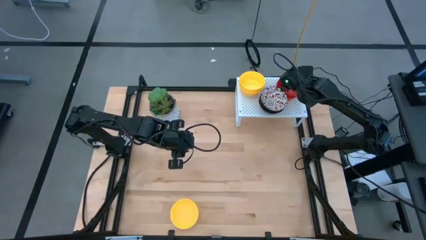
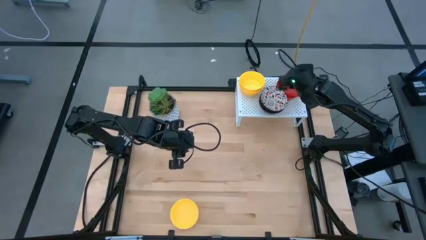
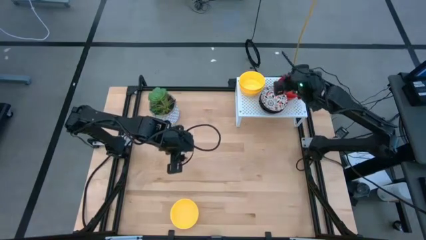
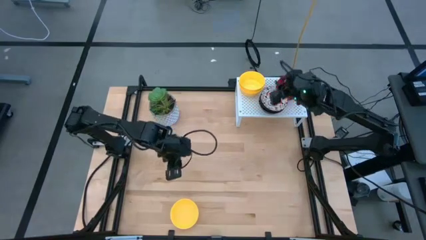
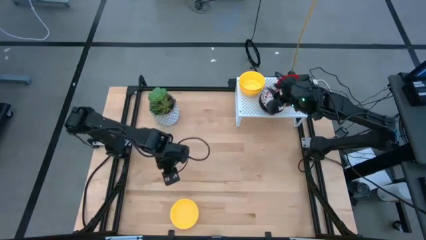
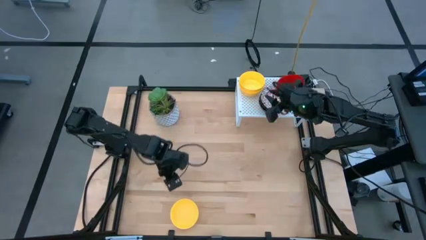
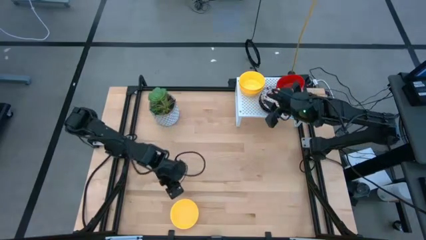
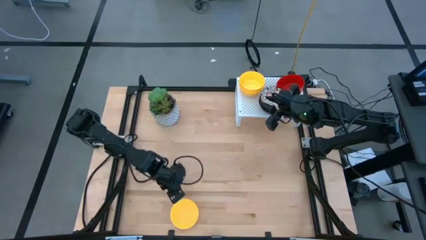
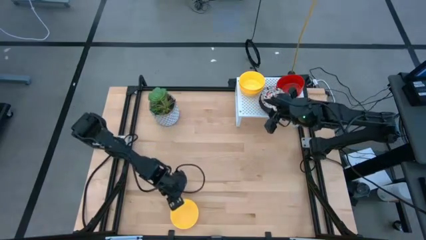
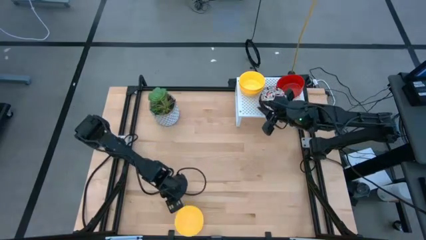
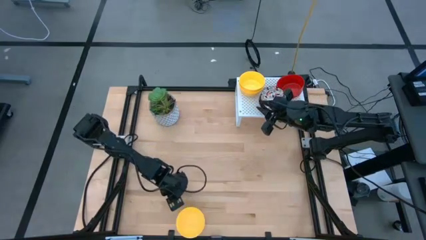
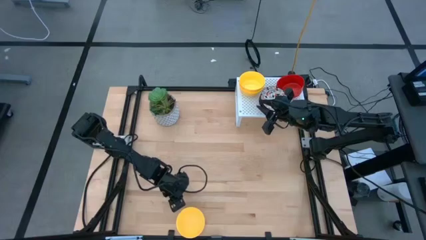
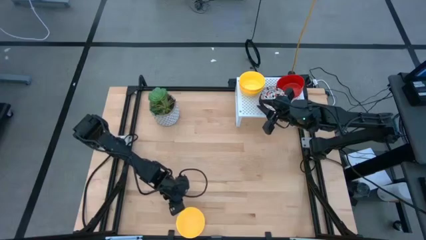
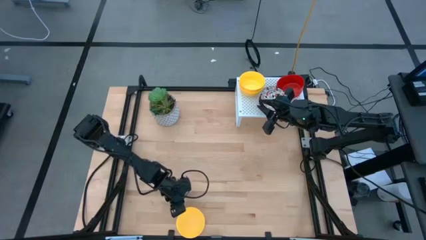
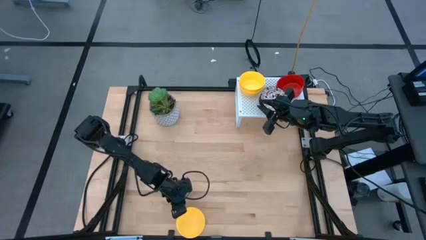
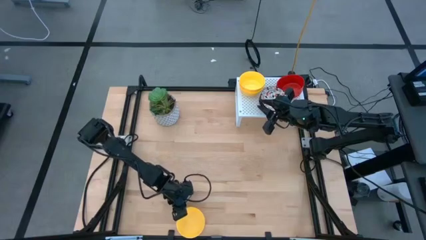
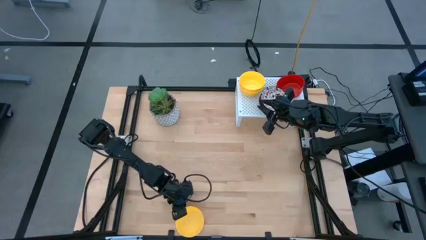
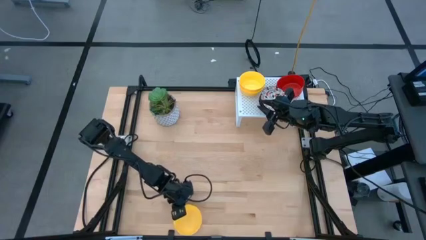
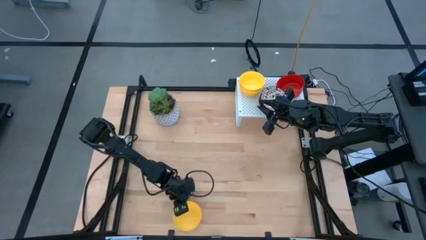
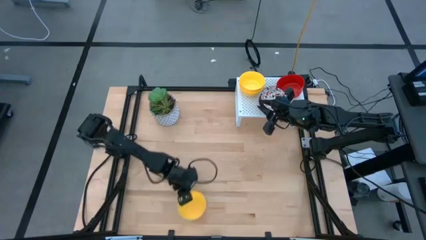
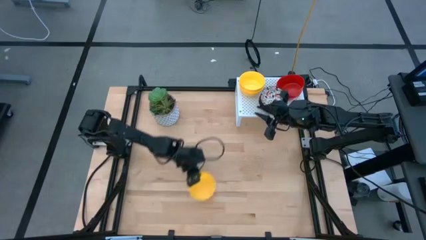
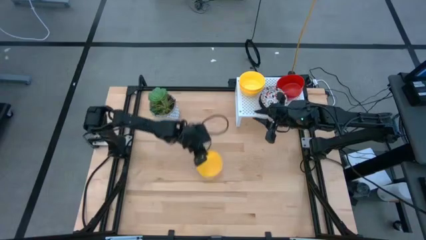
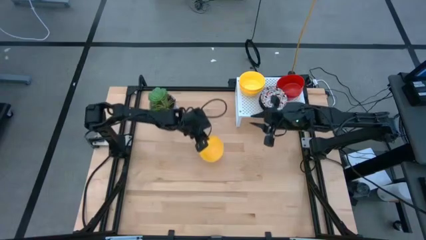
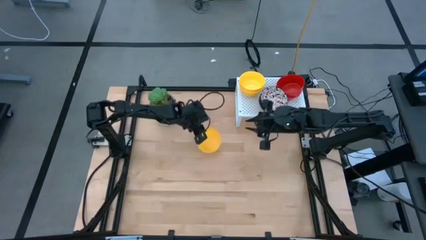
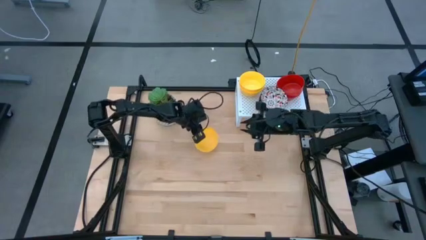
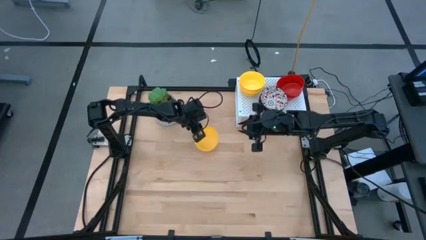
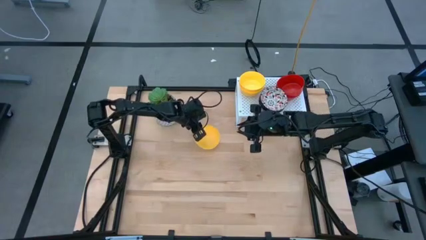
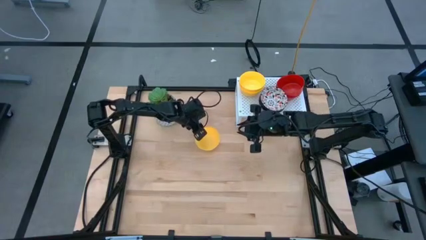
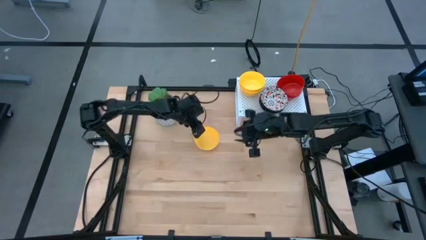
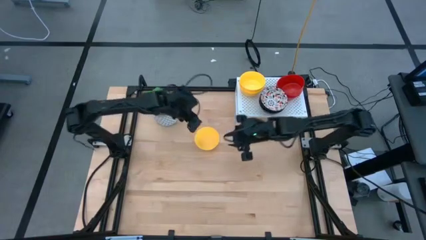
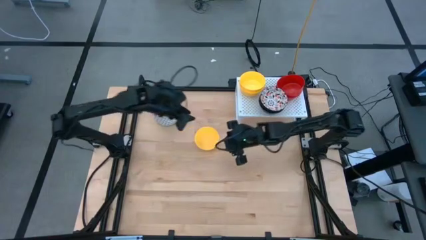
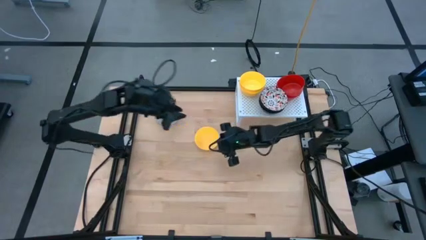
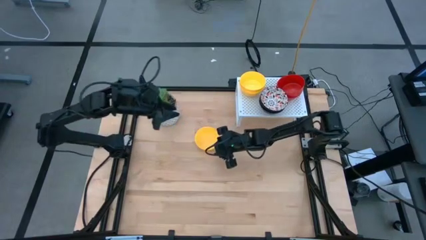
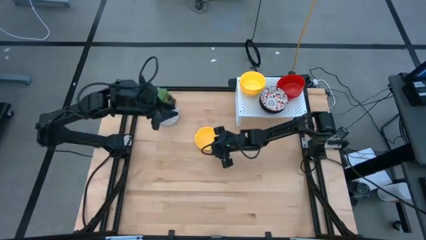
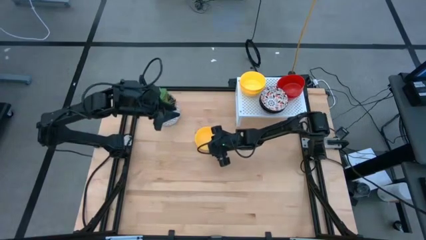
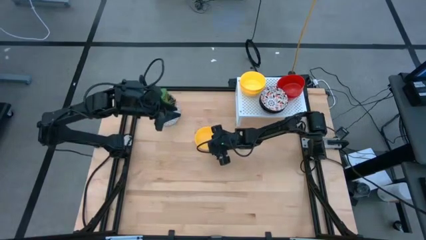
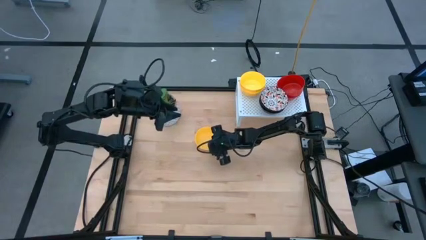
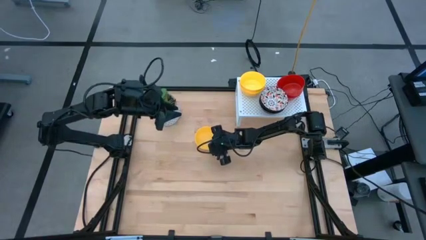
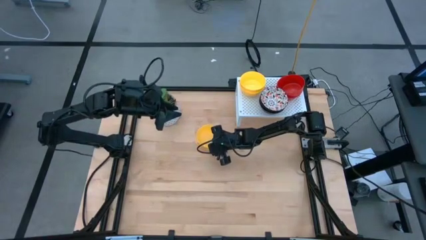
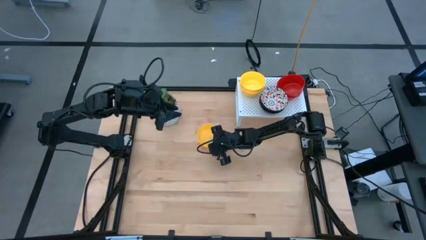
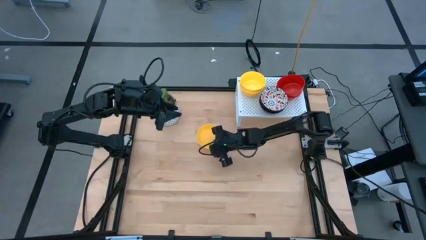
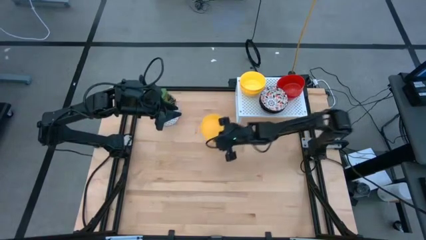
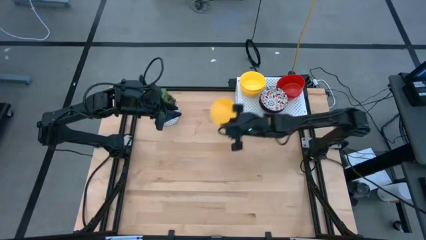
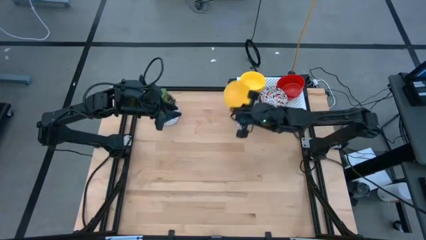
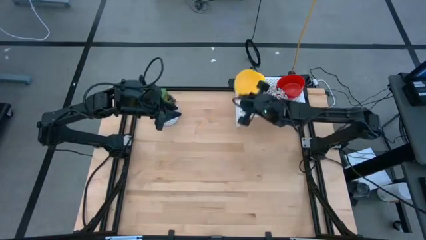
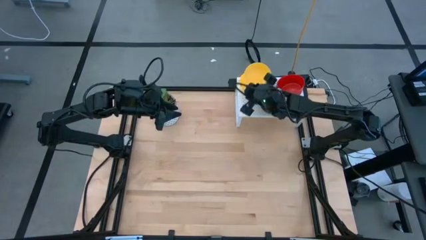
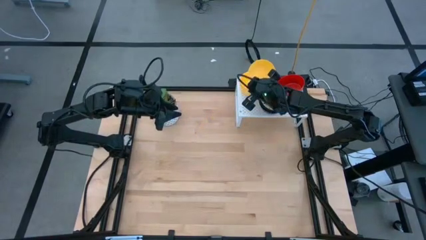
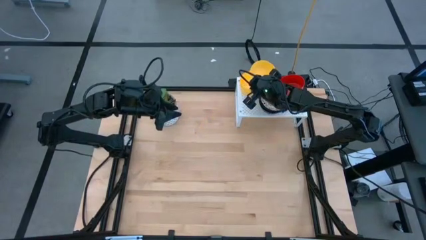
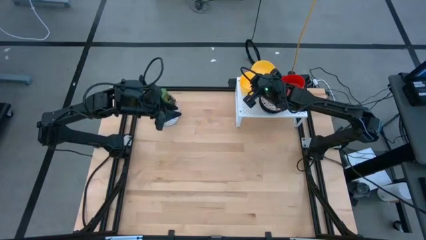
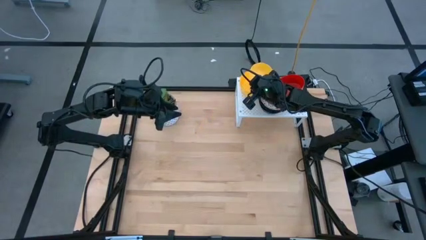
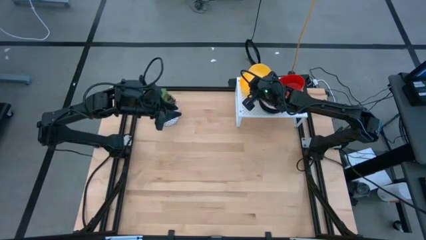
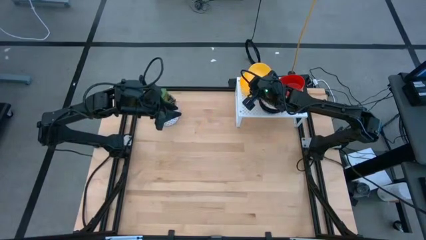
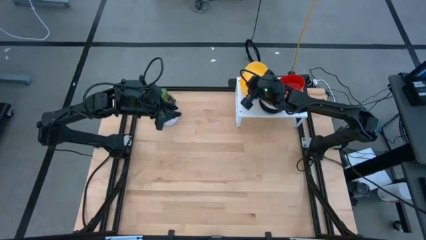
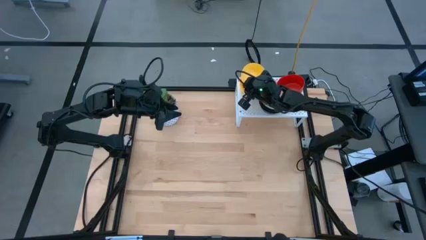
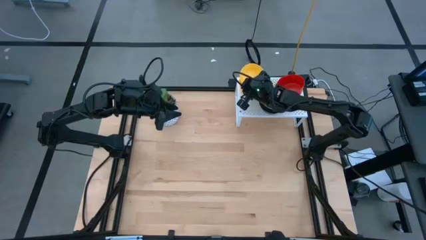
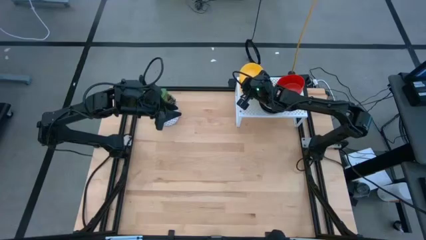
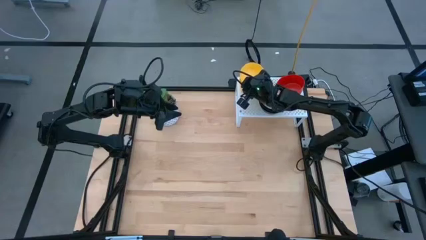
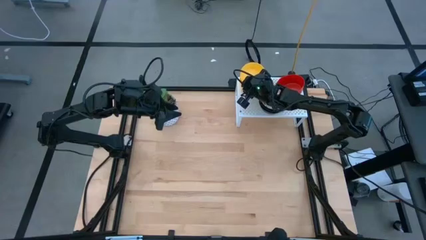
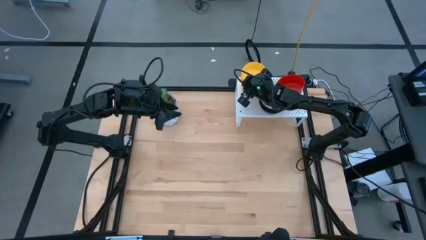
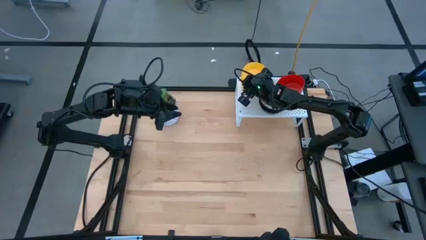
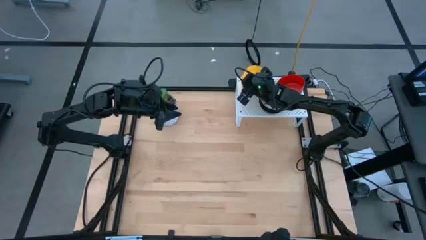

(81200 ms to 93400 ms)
Task: Pick & Place Mini bowls
Stack the yellow bowl on top of the yellow bowl on the shelf

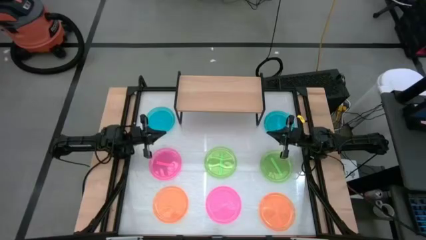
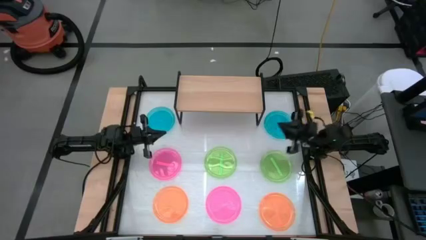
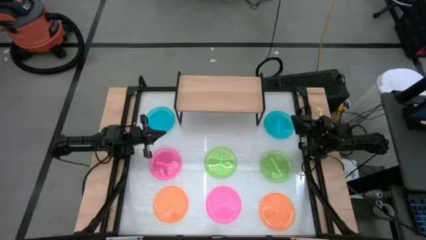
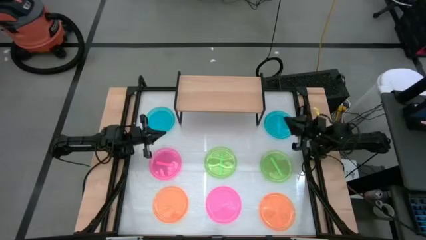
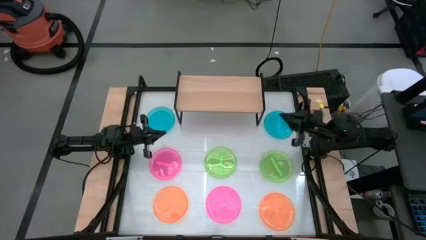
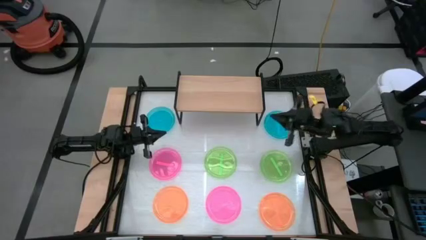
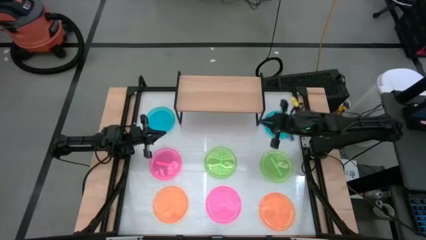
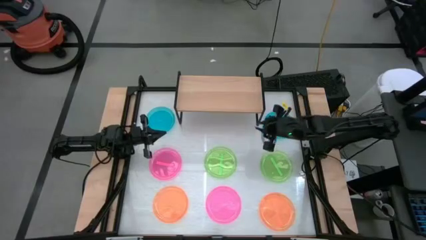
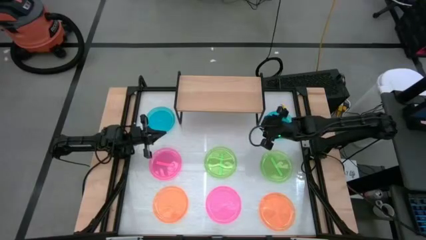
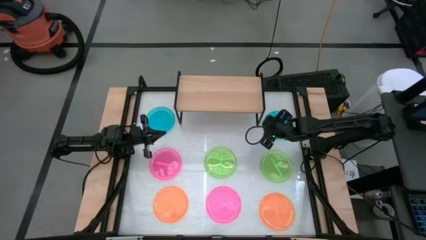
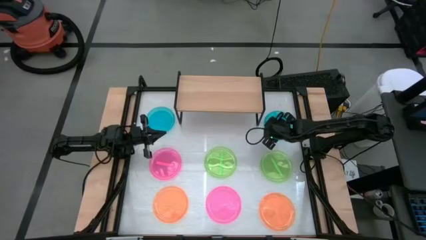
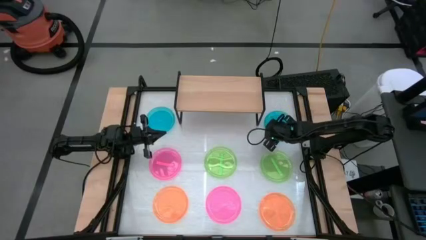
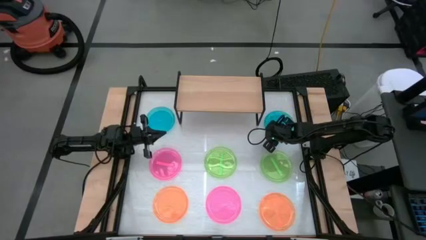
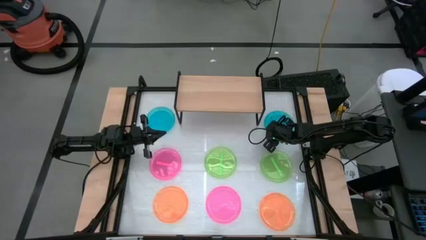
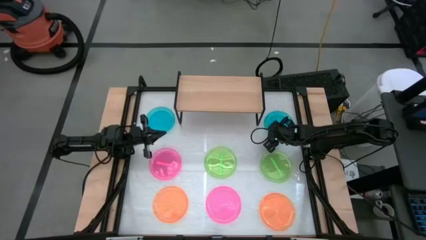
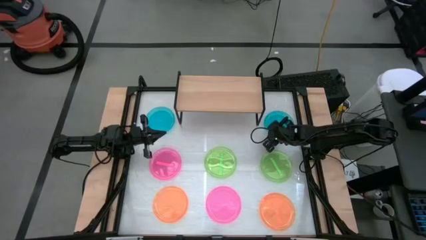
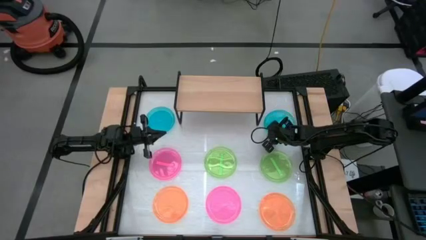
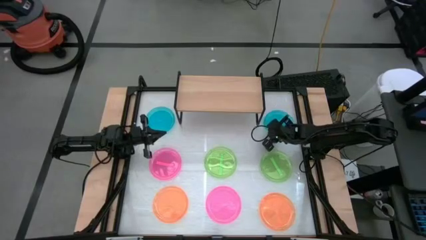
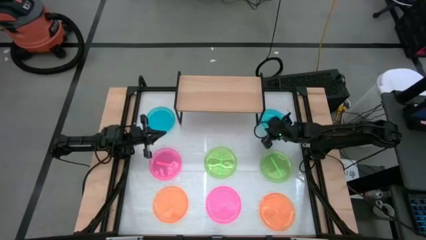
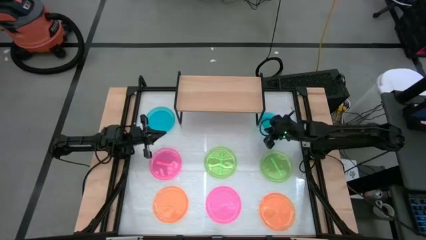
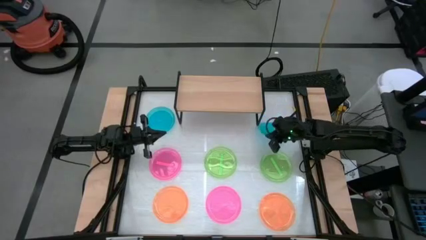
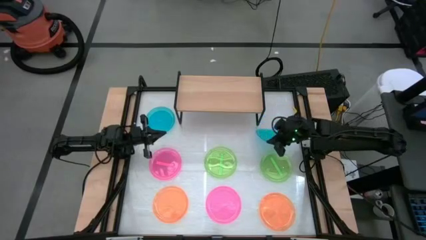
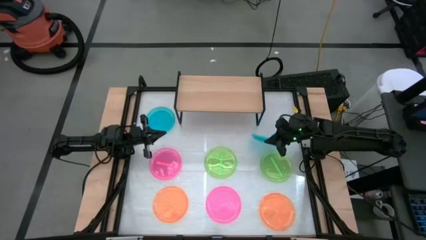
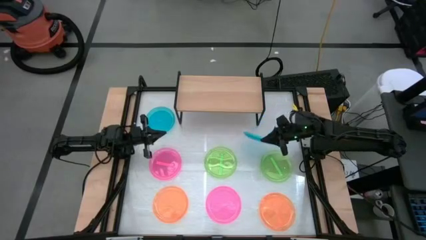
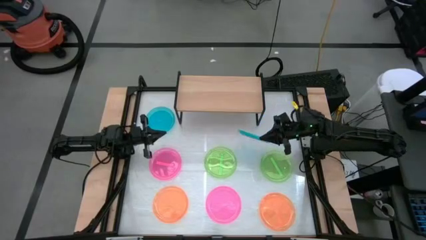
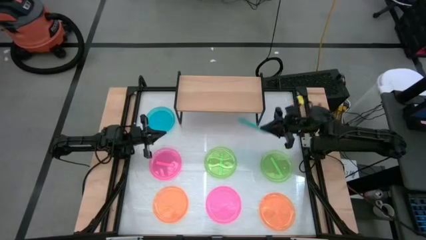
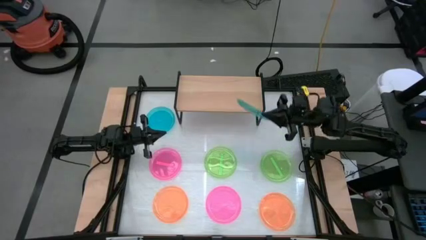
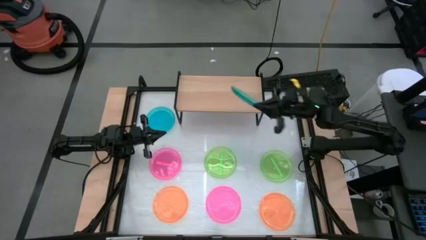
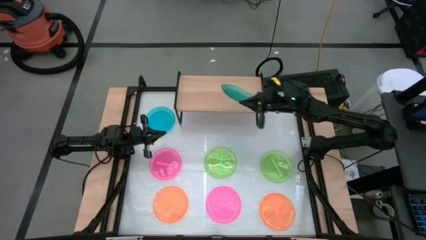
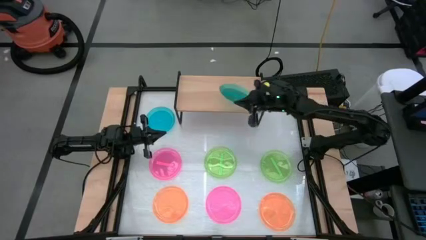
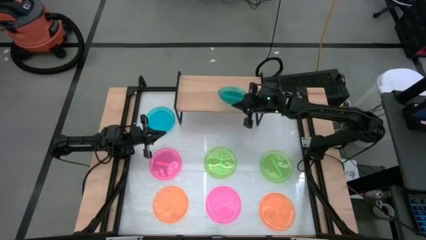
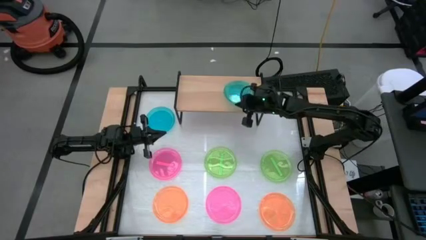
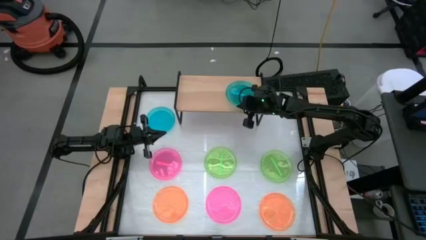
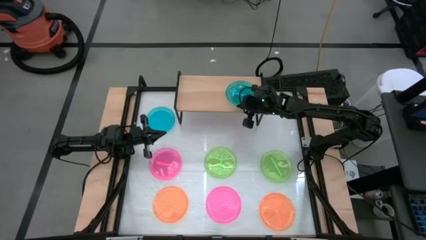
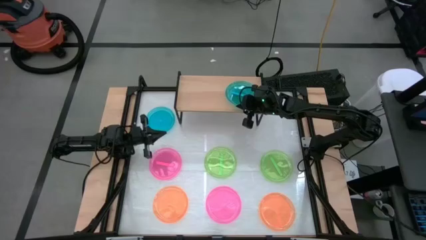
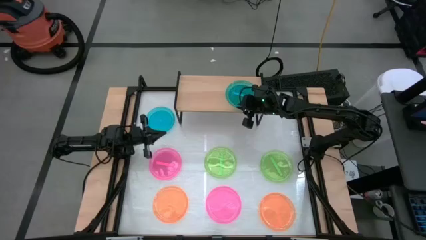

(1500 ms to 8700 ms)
Task: Place and stack plates onto a shelf
Put the right blue plate on the shelf
